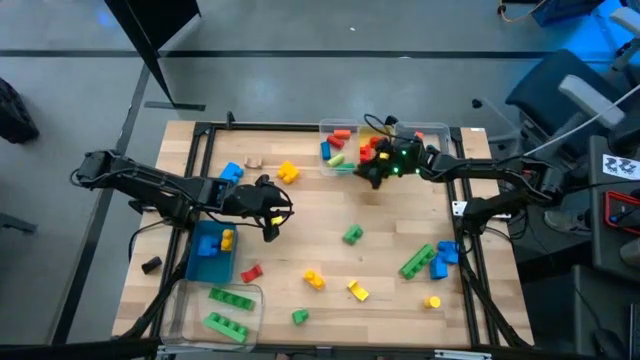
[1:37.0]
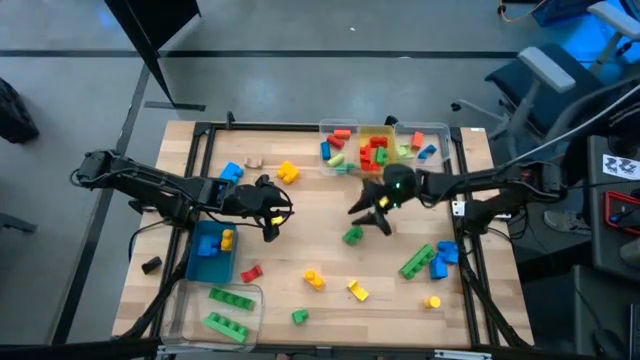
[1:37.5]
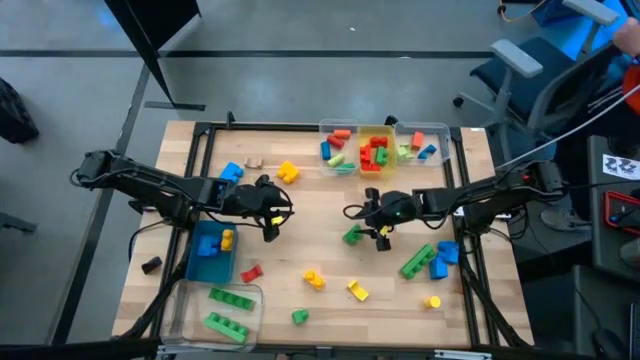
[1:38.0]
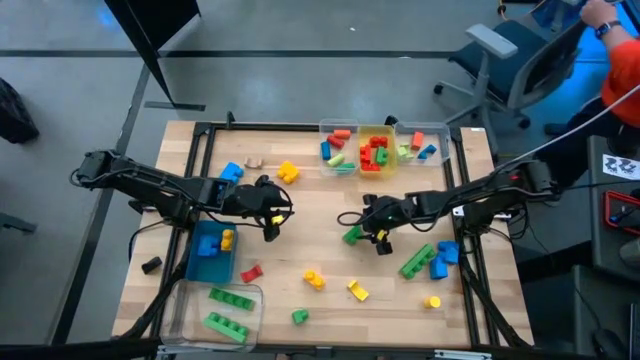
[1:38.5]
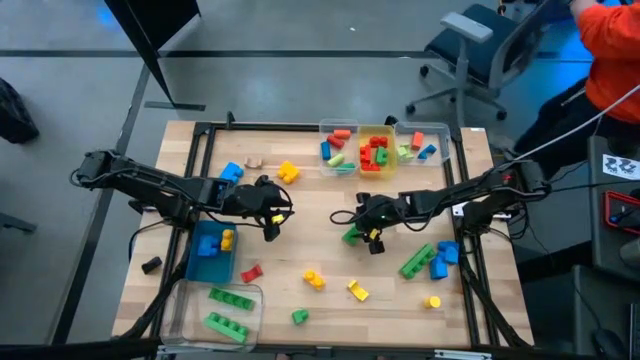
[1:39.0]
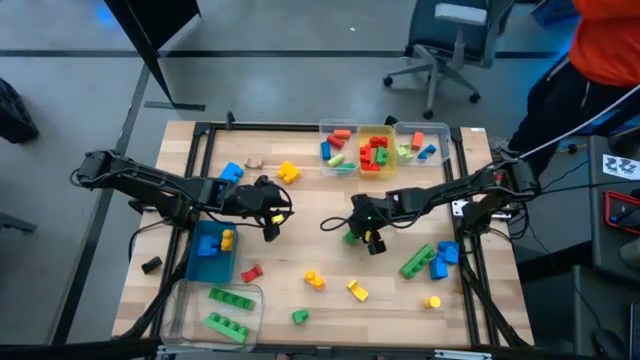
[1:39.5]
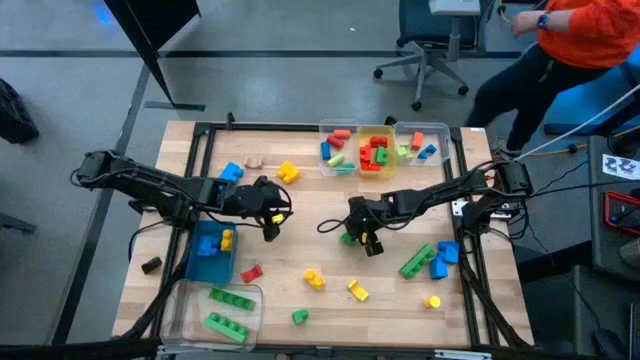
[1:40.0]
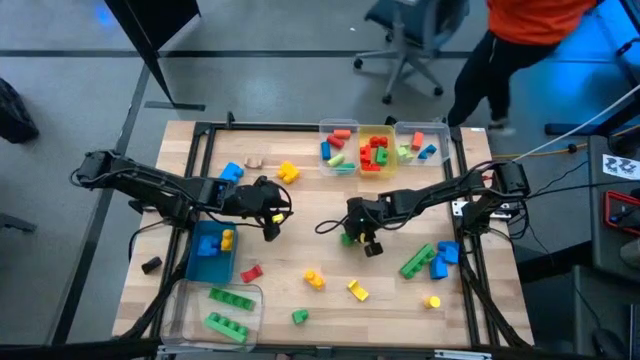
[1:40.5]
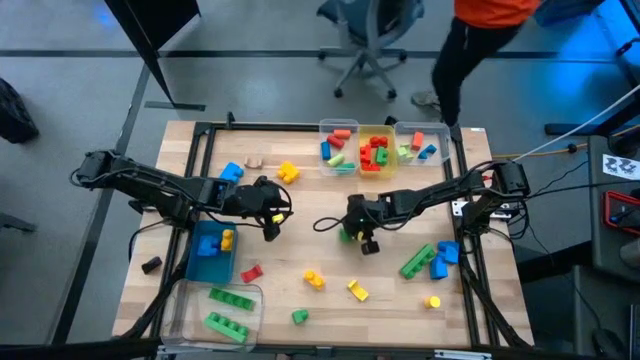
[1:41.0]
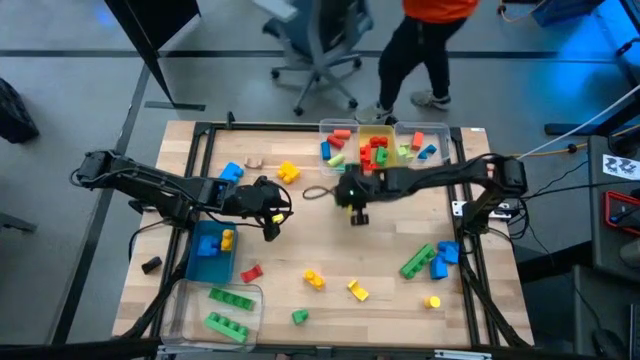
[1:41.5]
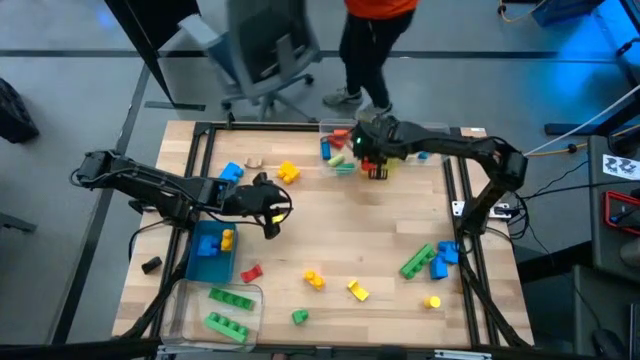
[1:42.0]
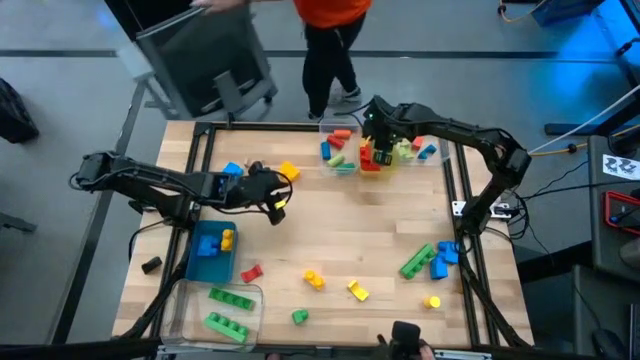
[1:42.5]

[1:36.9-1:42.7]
Task: Sort blocks by size
Put the green 2 stud game piece into the yellow bin

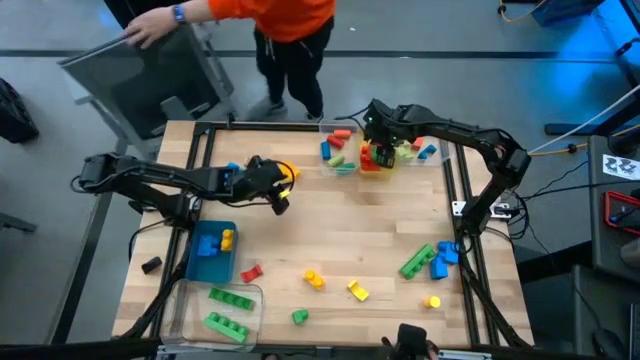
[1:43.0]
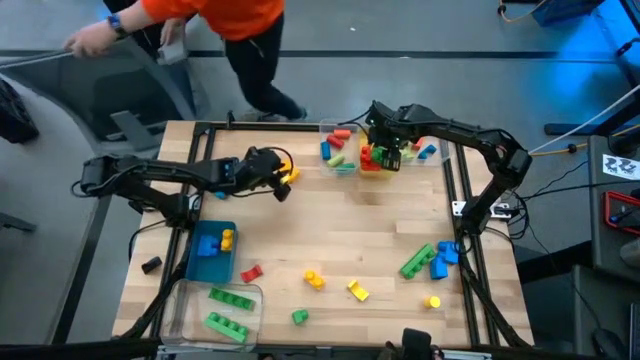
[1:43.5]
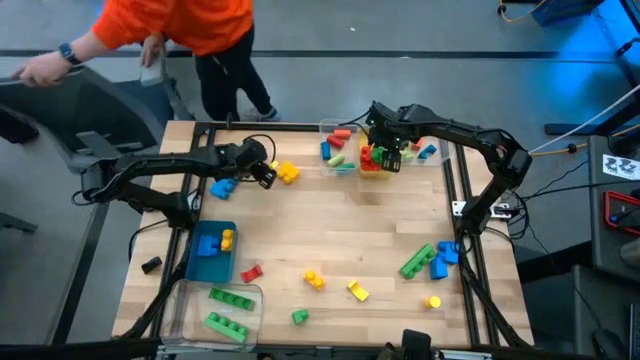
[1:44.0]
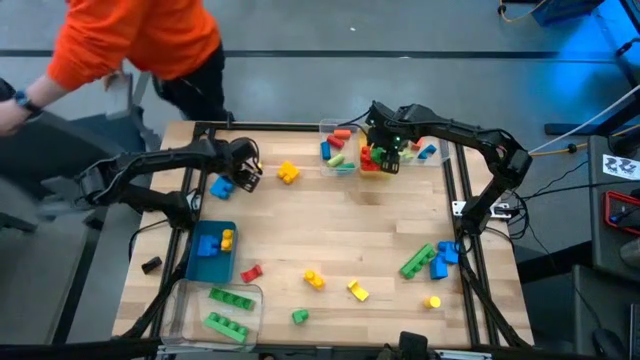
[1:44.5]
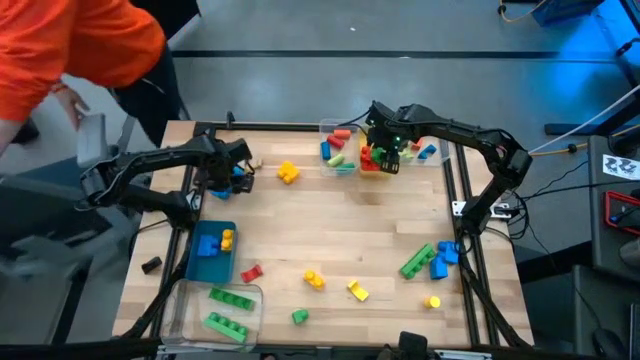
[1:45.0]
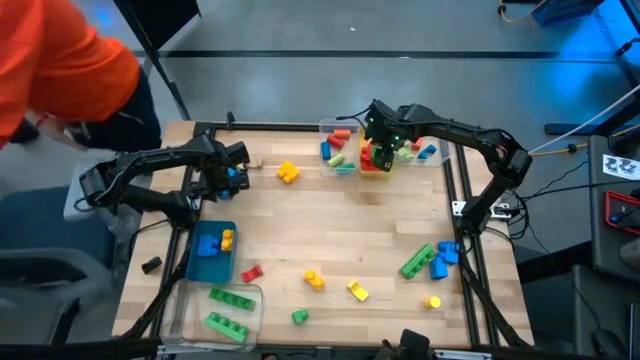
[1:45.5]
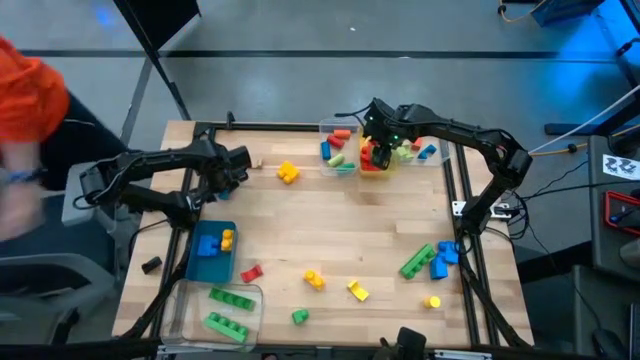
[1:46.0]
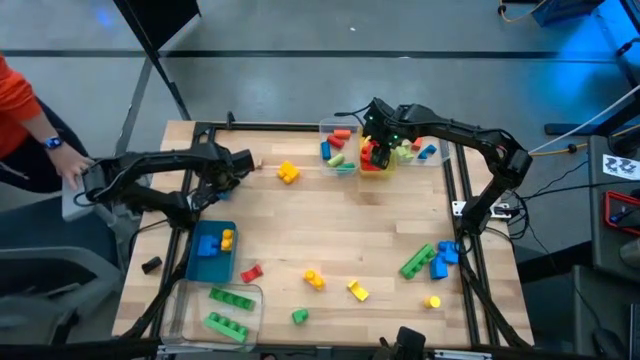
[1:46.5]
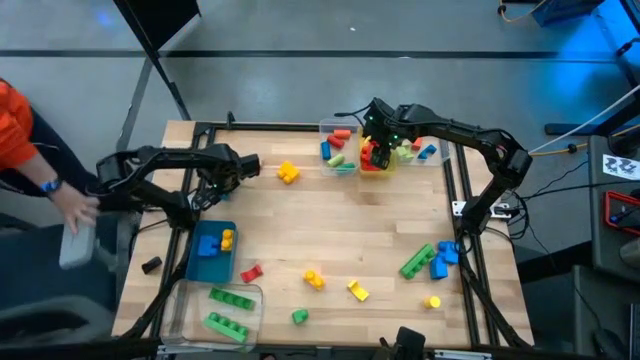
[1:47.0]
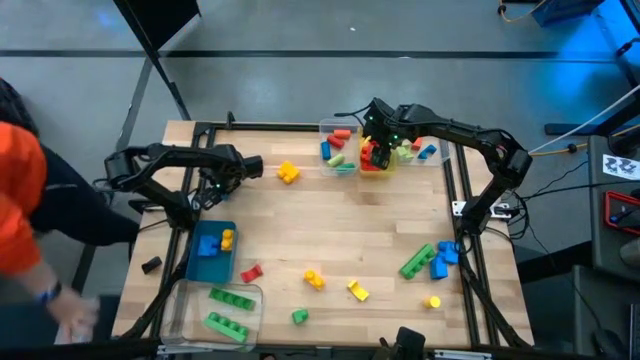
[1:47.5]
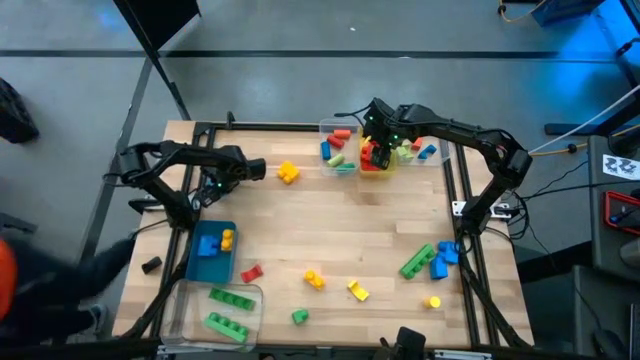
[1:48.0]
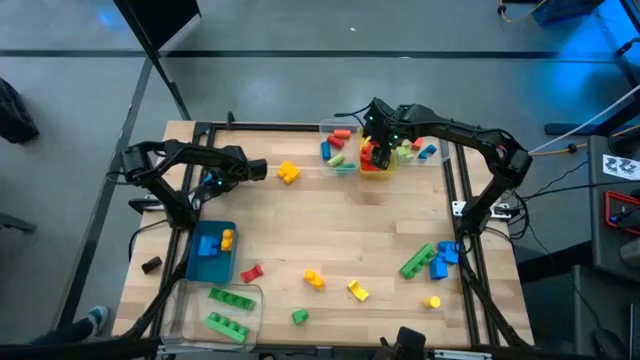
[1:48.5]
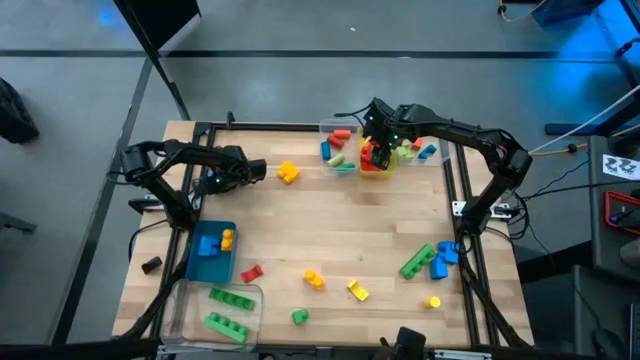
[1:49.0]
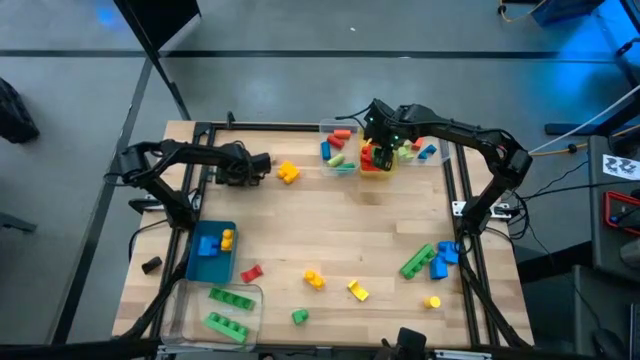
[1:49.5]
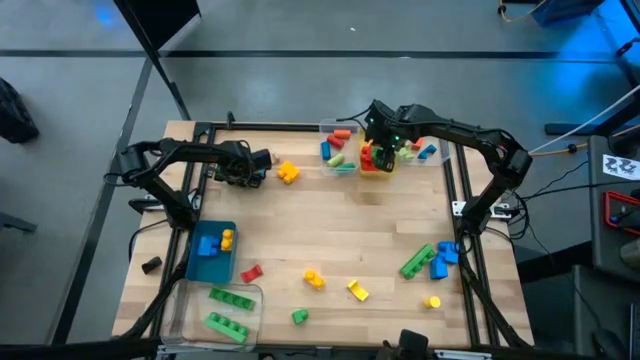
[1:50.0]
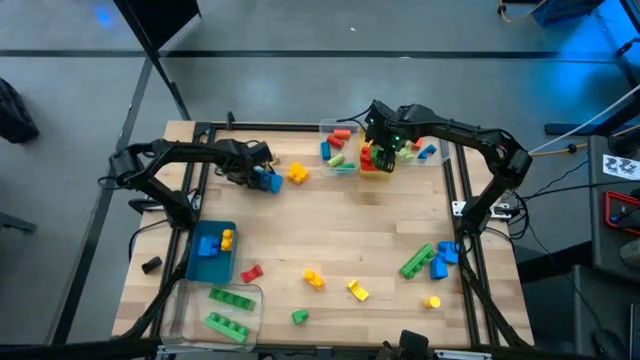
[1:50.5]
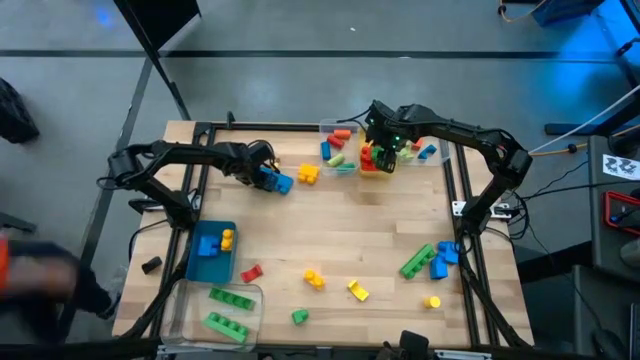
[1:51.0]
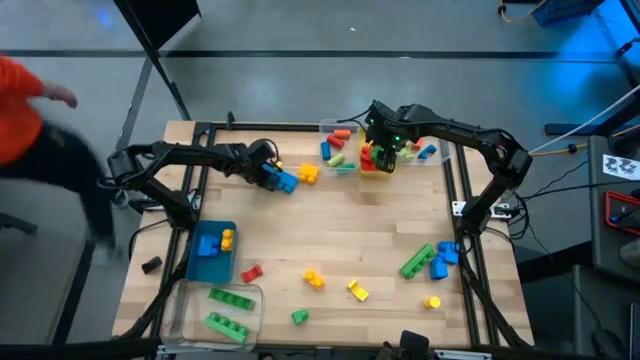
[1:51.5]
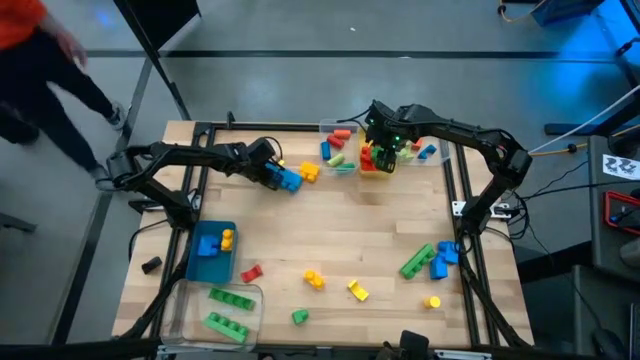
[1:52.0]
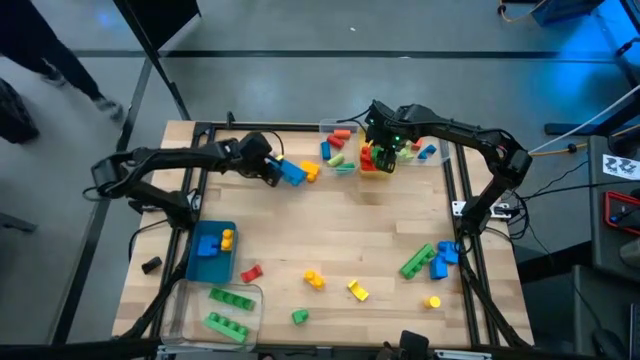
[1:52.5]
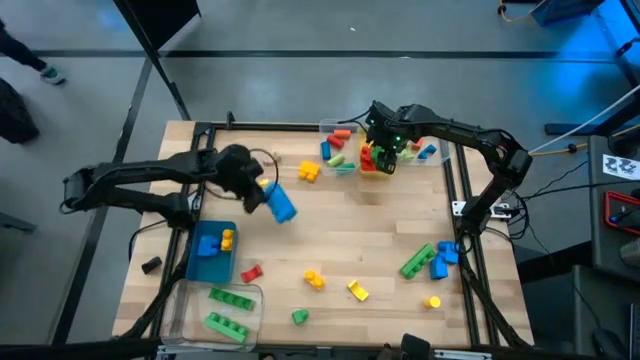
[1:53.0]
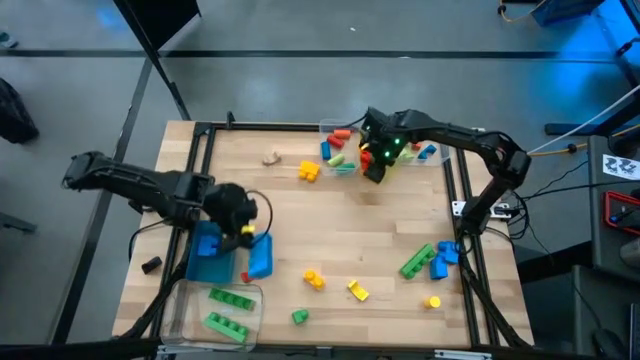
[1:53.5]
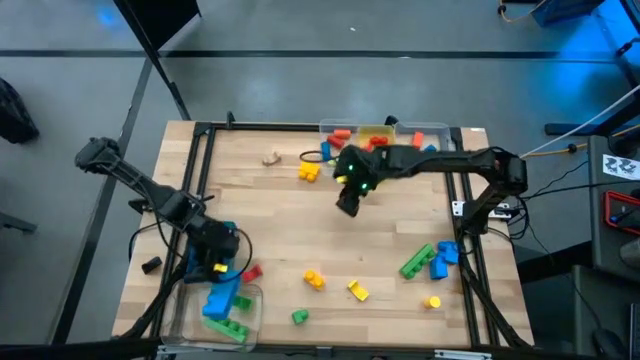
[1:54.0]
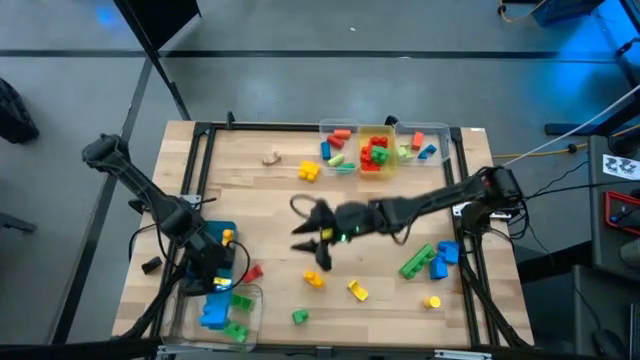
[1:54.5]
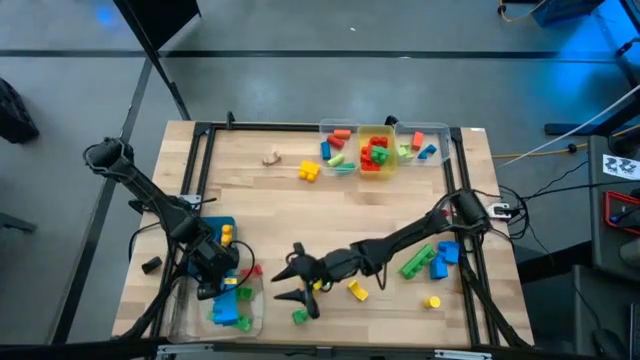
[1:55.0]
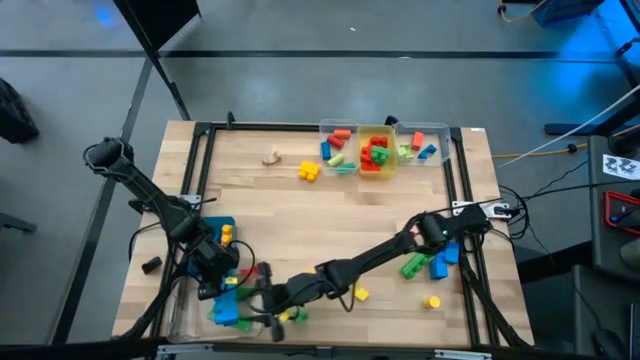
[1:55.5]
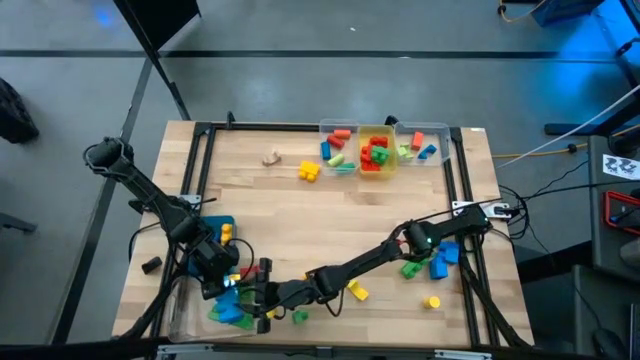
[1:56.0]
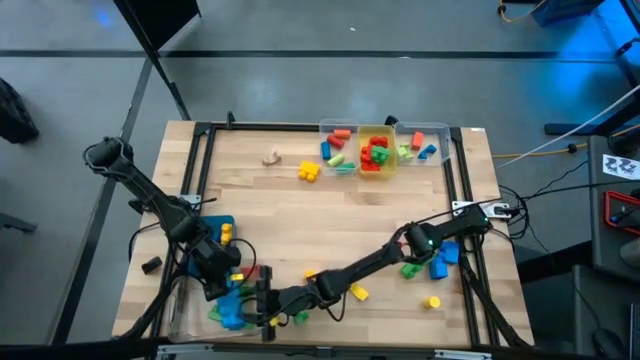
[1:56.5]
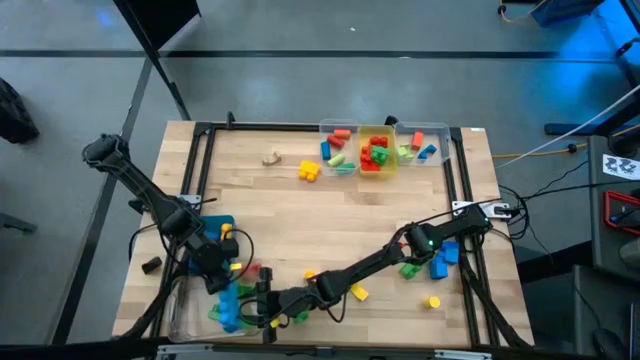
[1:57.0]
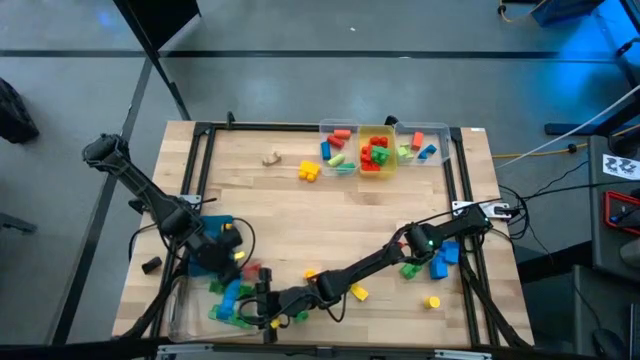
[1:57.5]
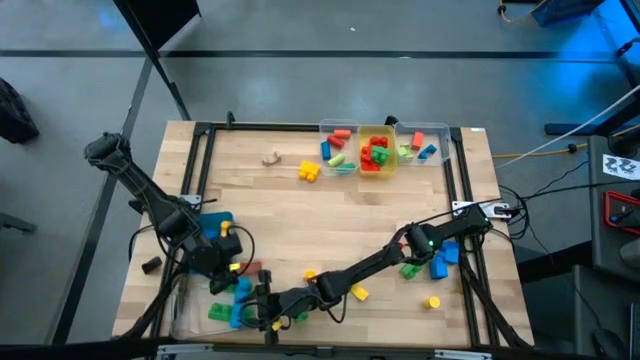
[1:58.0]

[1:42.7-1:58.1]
Put the blue 4 stud game piece into the bottom transparent bin
